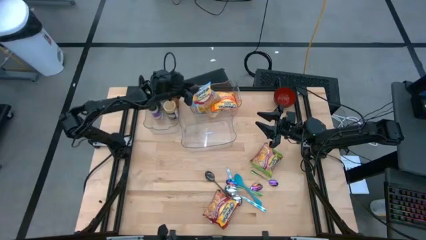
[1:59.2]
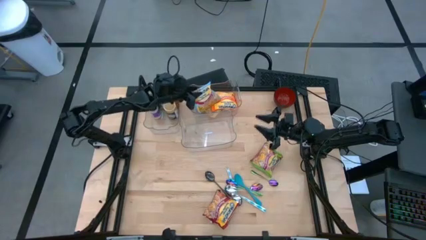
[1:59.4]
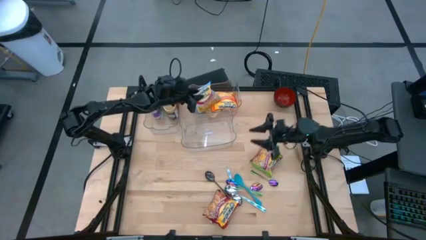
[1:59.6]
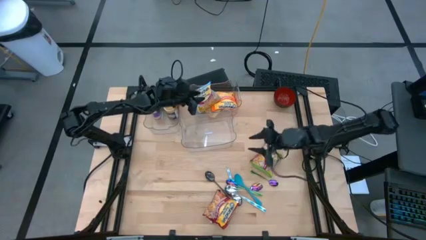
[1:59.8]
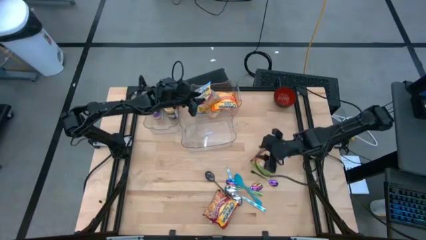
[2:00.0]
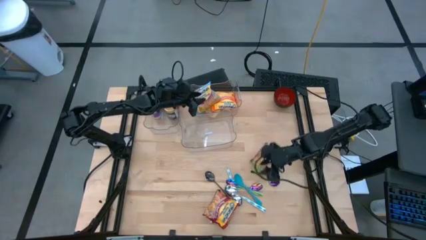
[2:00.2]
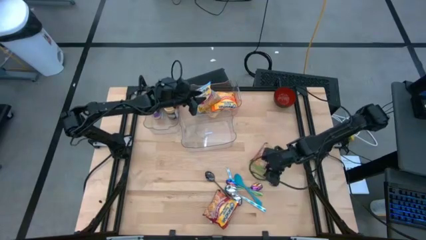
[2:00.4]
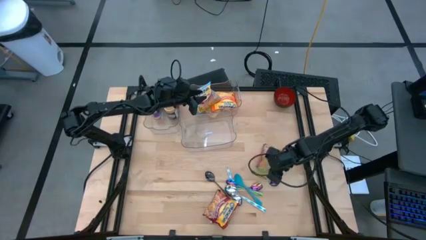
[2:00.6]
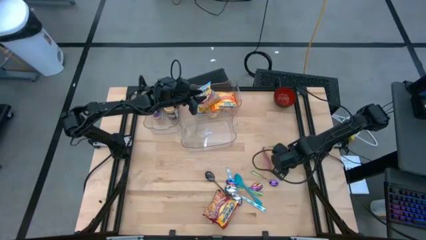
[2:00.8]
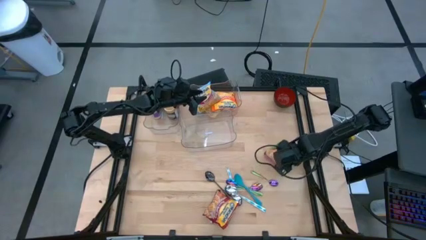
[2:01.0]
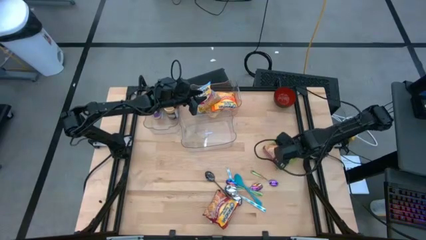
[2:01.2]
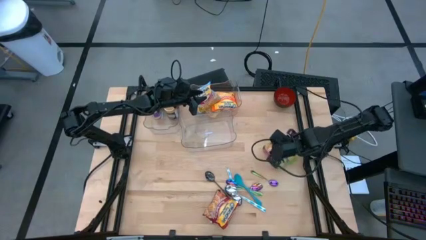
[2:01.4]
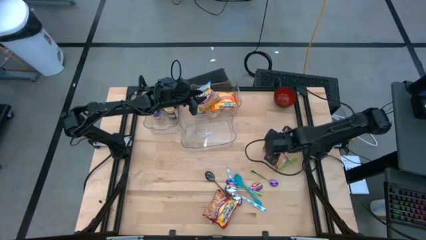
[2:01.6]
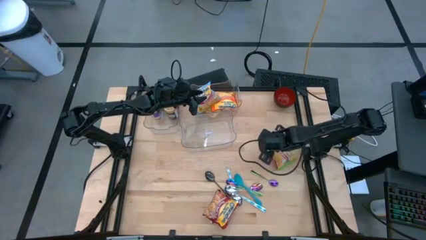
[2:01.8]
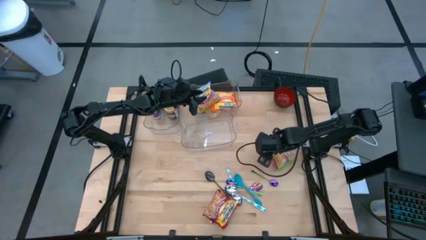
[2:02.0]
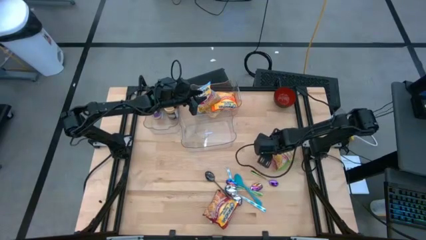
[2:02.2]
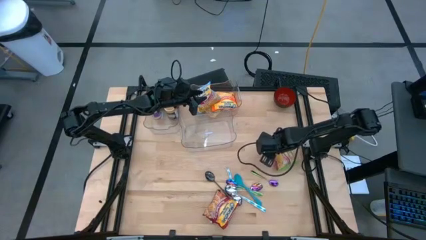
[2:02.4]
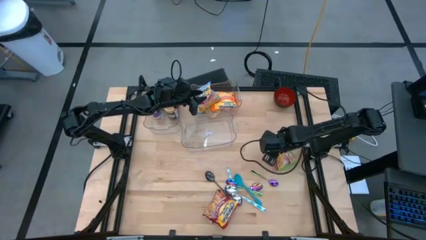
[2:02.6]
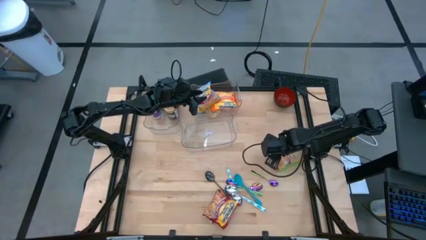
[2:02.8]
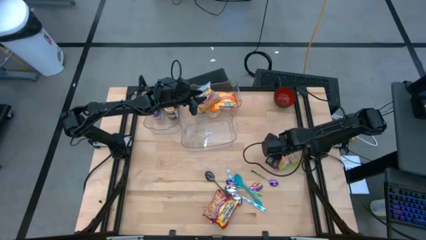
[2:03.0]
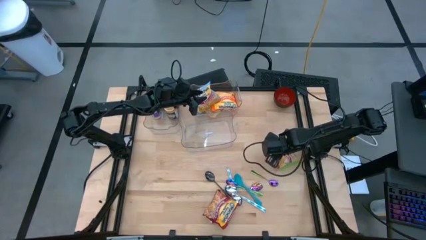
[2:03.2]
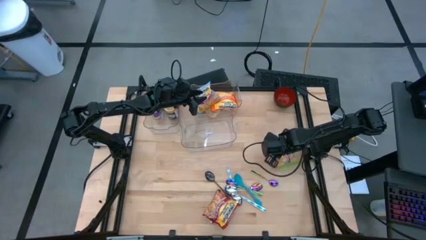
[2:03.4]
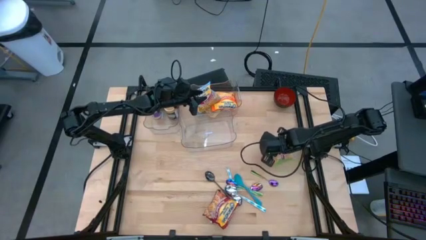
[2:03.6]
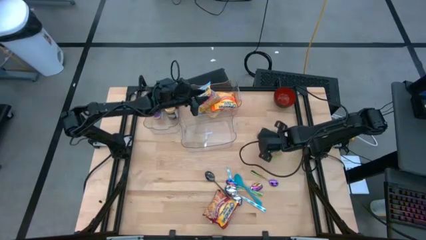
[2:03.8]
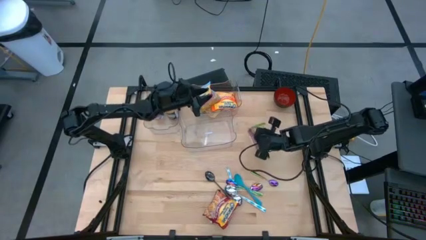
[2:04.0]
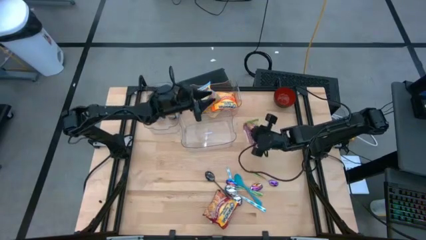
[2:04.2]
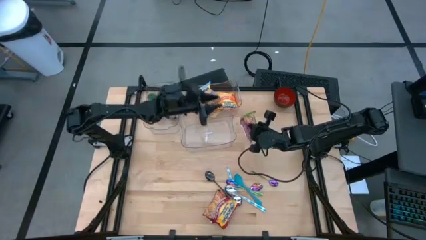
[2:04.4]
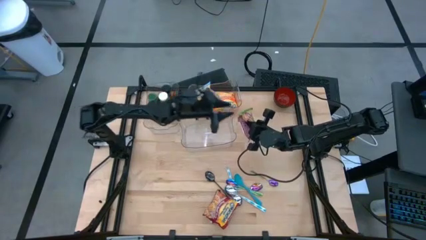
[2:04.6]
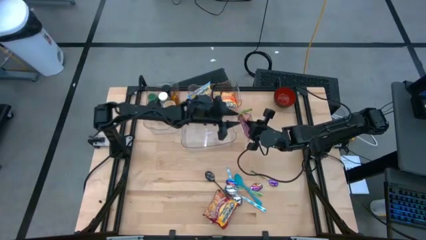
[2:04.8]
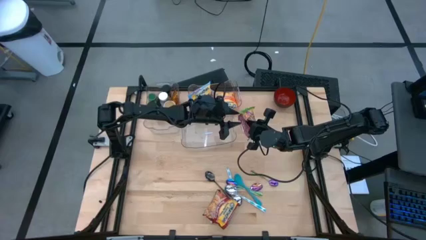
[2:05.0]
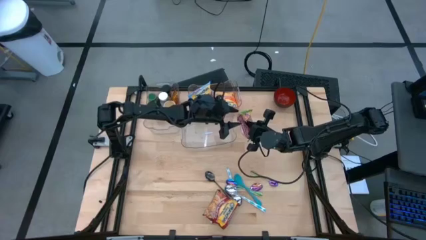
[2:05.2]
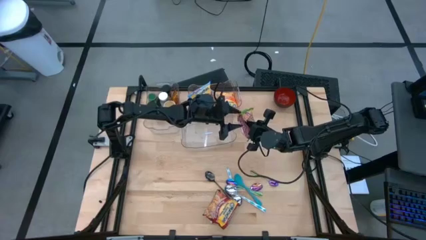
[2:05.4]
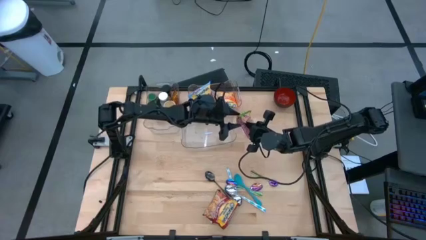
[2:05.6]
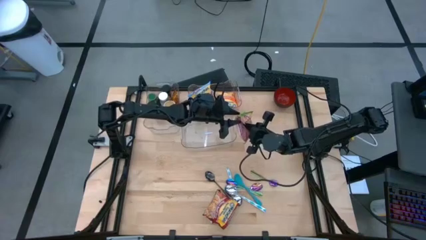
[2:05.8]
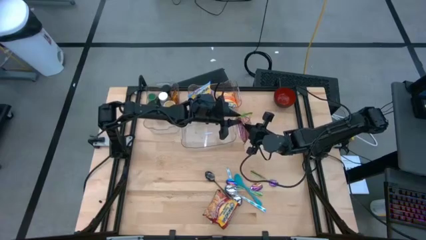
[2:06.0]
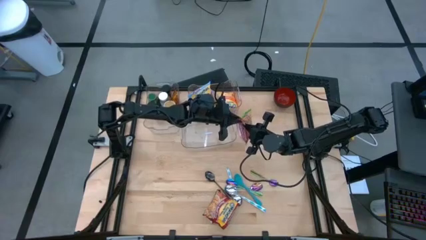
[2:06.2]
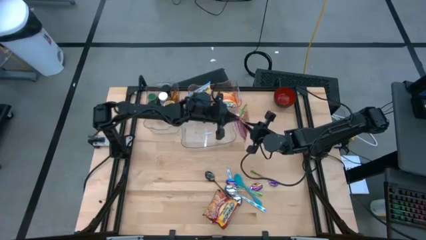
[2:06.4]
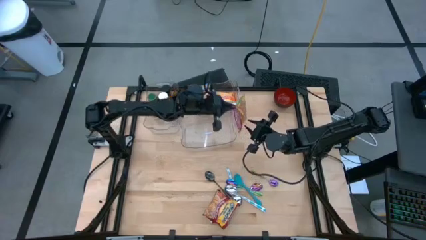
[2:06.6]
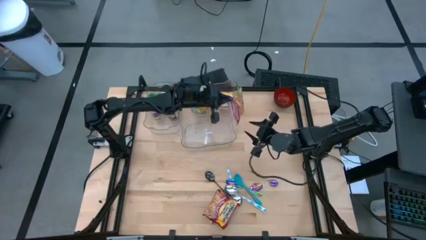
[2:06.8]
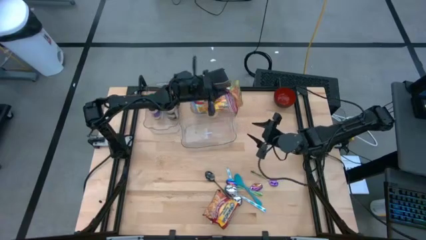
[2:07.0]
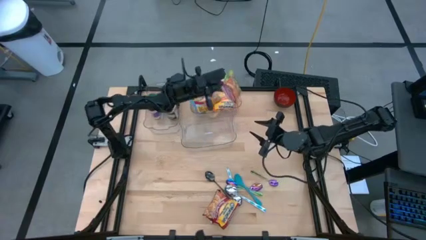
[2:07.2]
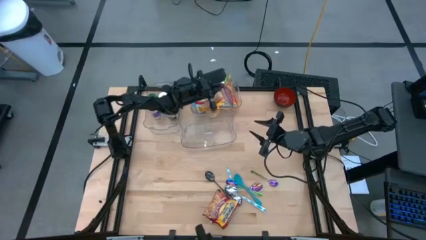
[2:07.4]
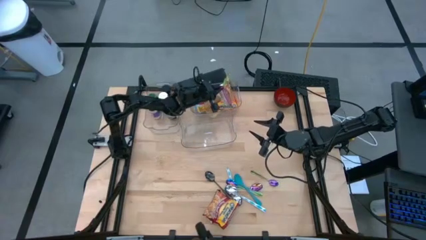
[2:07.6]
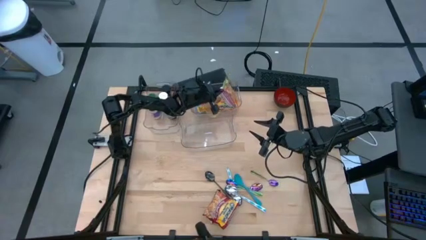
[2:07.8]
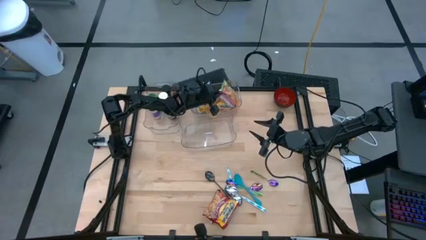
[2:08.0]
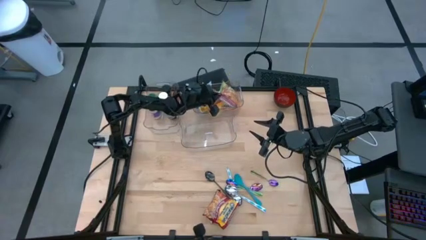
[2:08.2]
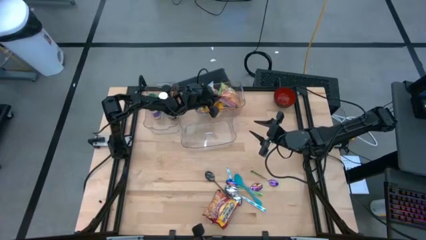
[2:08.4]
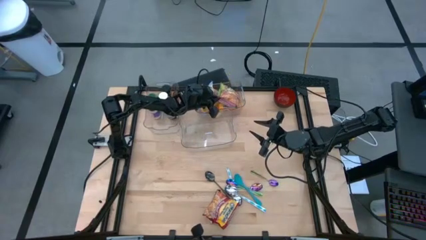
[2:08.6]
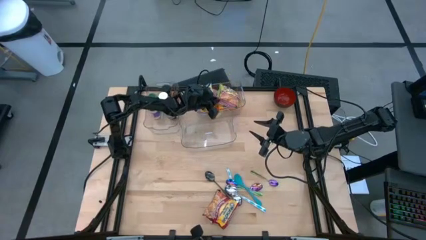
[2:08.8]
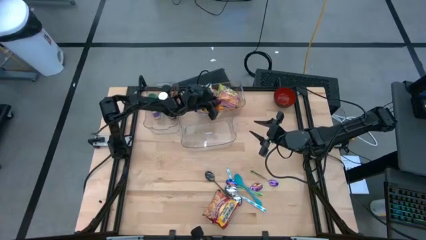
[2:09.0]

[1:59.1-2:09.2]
Task: Pick & Place Food Item
Put the green noodle pack into the top right transparent bin

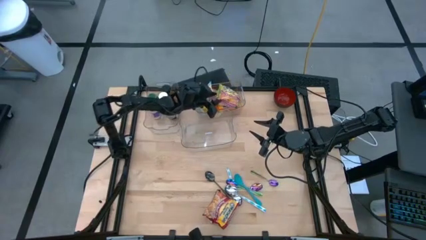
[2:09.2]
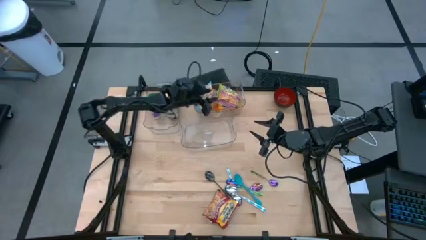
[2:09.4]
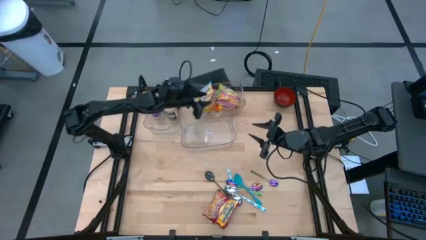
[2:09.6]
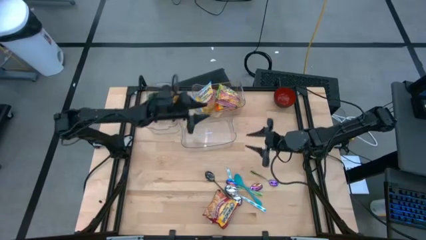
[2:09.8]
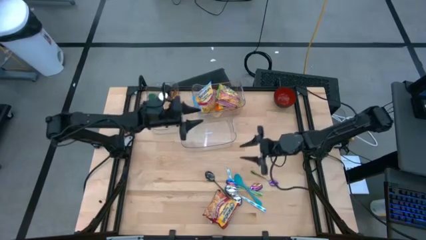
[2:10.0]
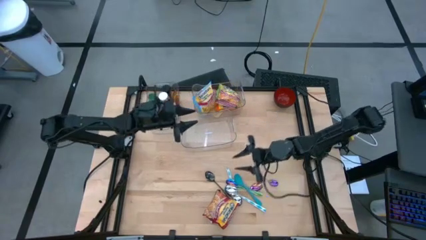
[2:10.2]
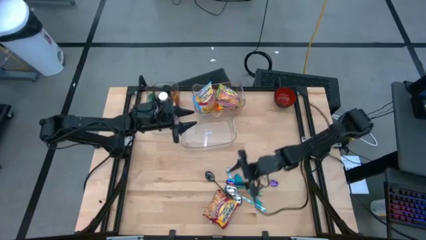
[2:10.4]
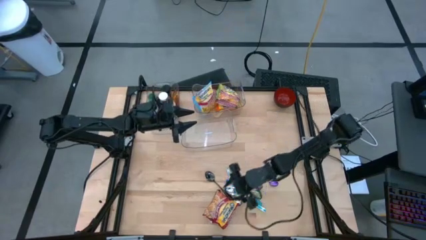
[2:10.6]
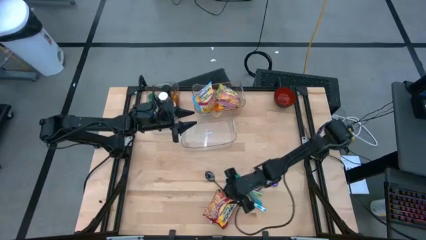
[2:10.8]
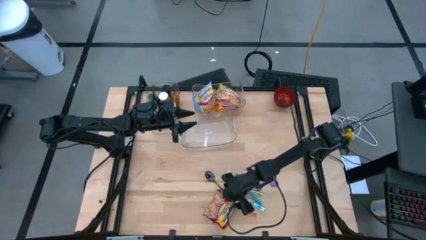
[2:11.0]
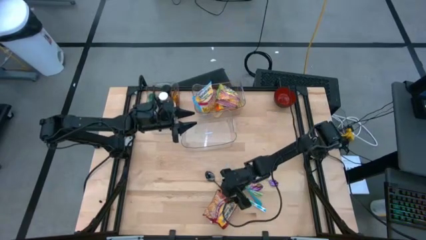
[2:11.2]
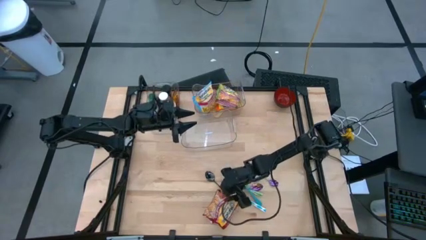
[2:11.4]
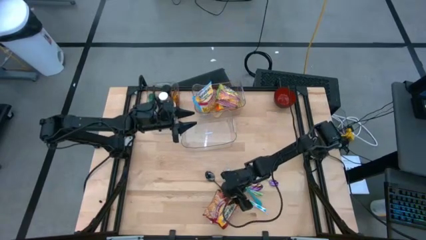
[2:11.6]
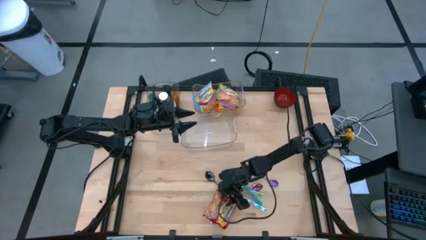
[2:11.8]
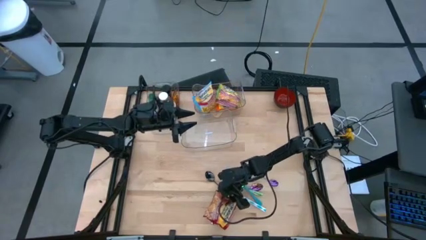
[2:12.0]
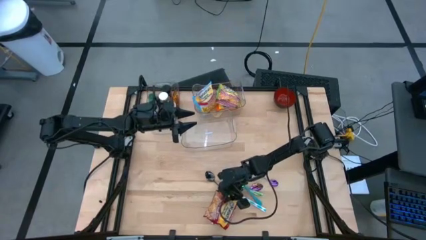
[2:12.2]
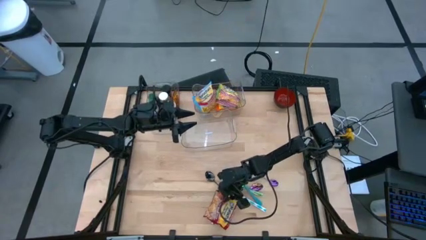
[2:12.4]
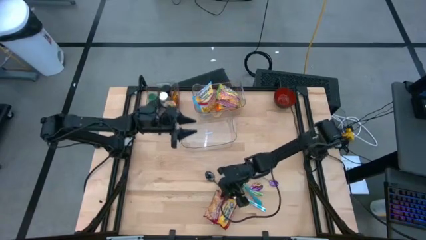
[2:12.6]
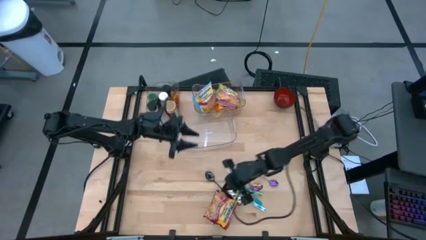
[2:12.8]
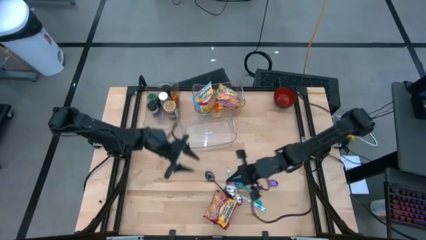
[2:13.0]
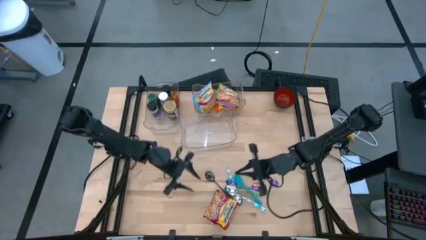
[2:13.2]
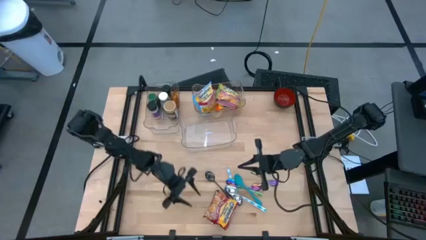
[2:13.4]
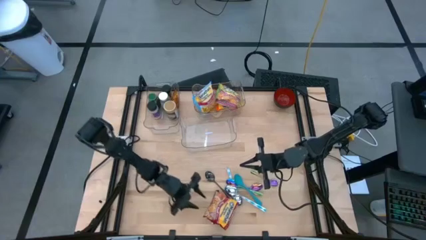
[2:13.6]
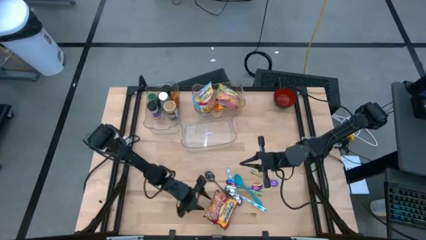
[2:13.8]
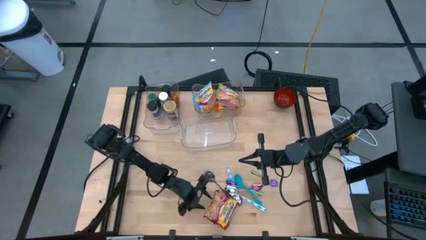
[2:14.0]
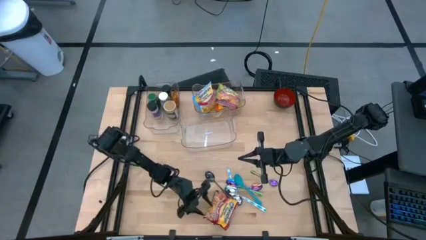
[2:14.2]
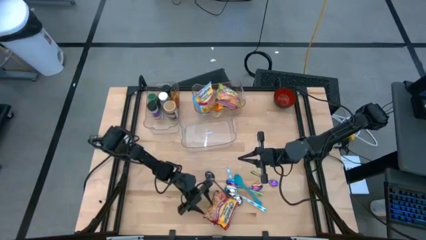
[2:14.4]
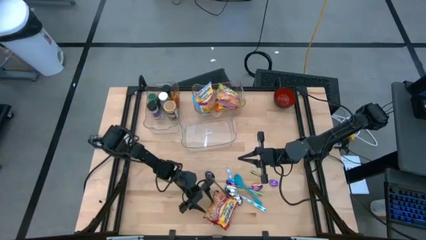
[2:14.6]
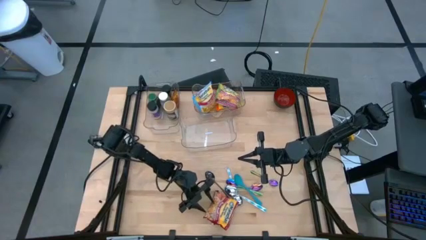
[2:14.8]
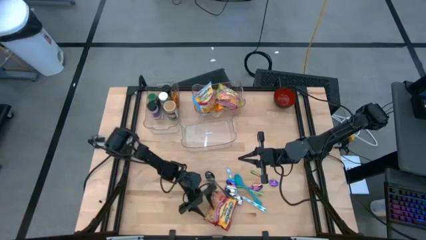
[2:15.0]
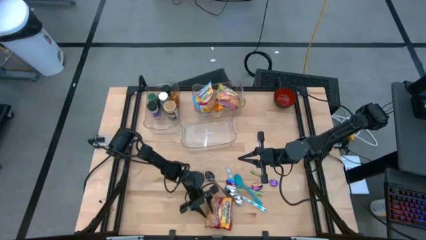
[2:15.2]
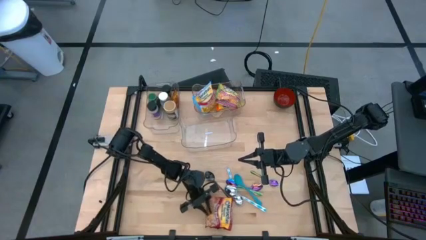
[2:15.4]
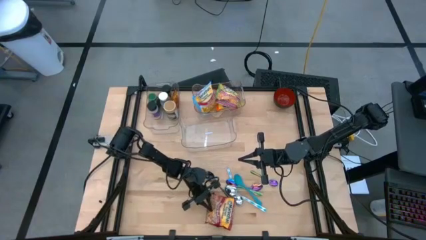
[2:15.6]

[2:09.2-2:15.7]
Put the red noodle pack into the top right transparent bin
